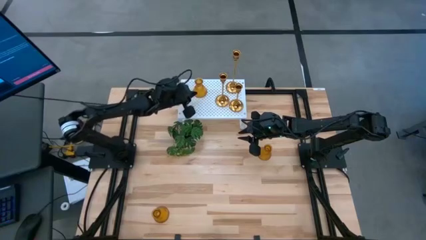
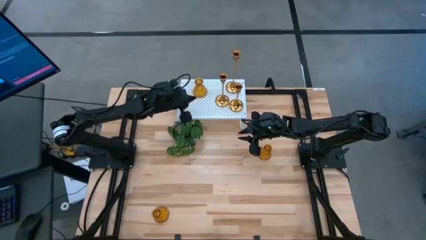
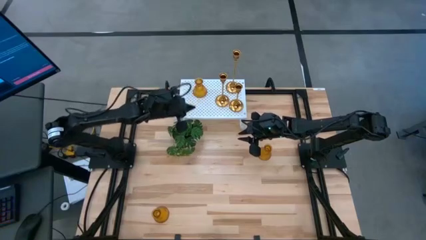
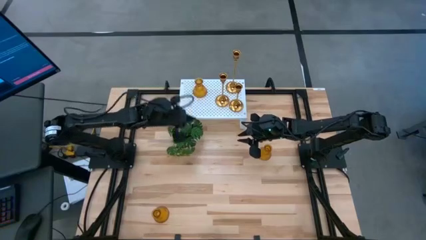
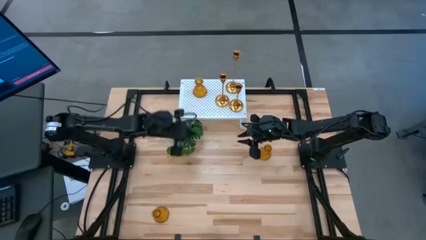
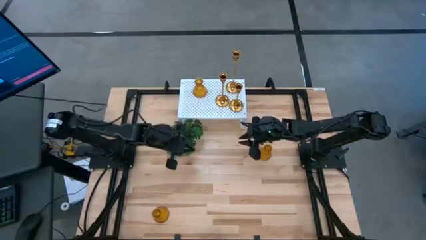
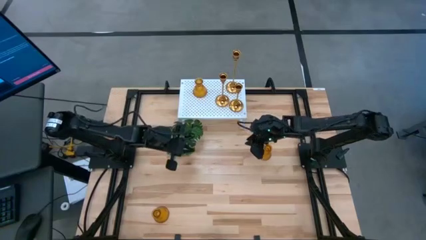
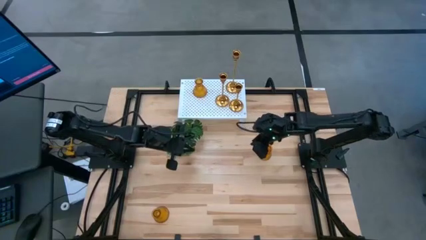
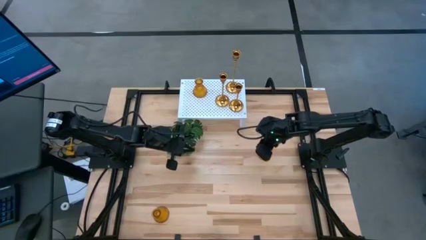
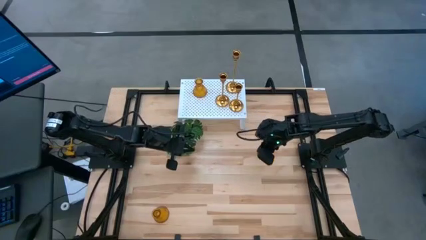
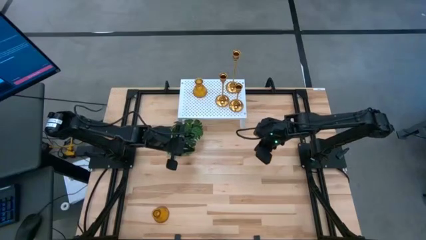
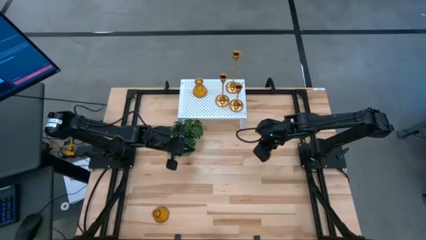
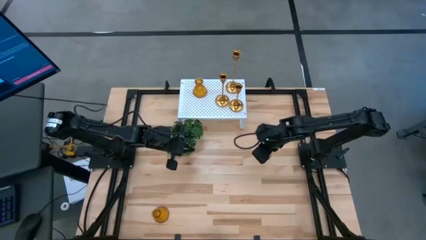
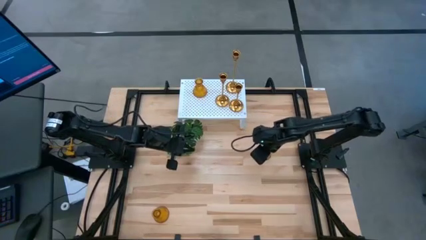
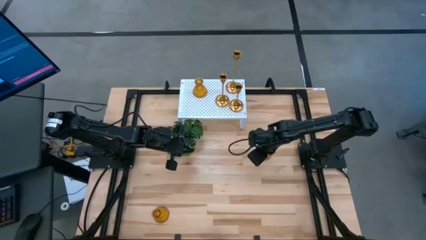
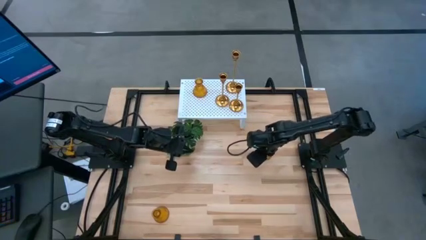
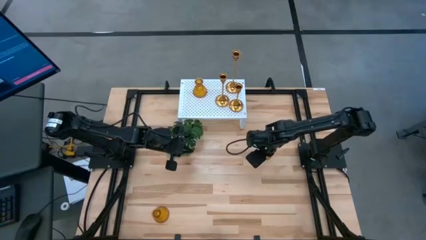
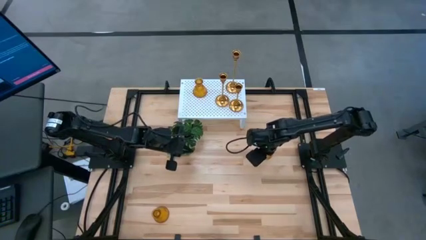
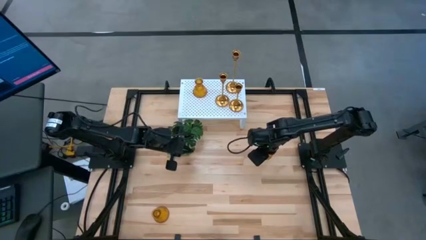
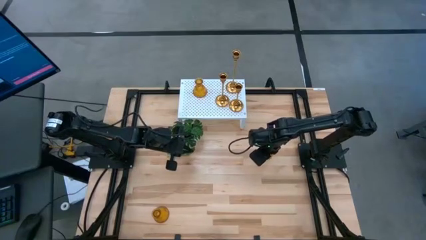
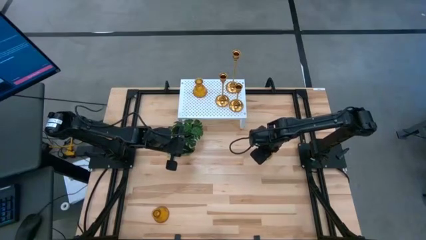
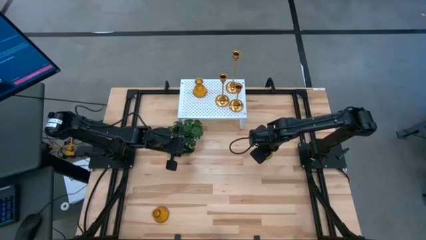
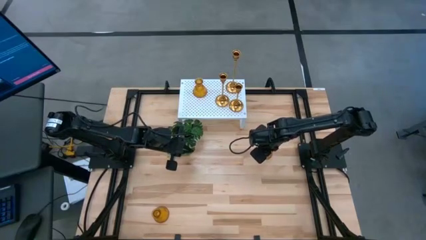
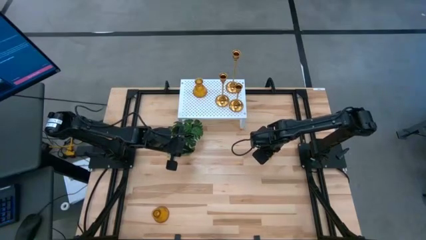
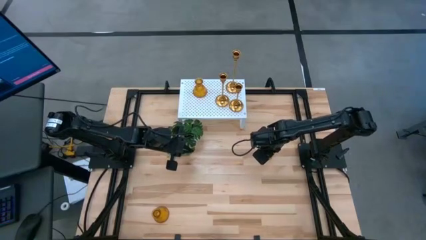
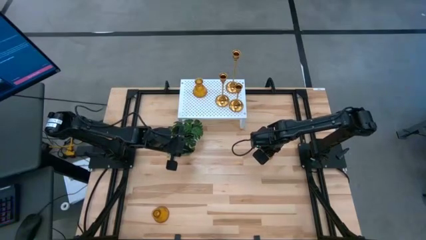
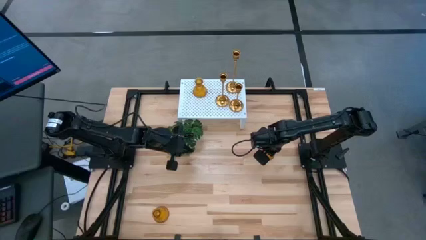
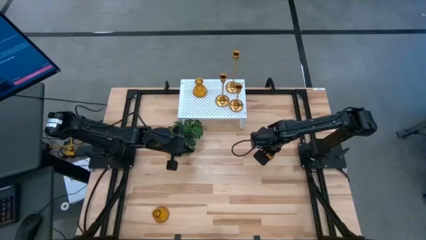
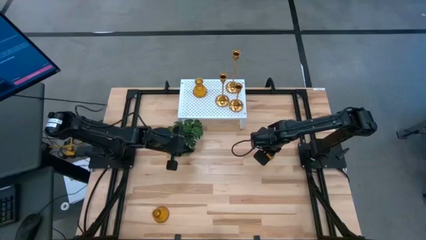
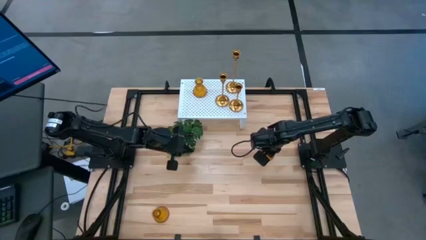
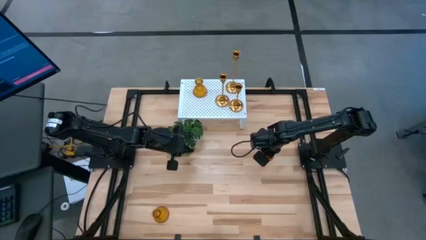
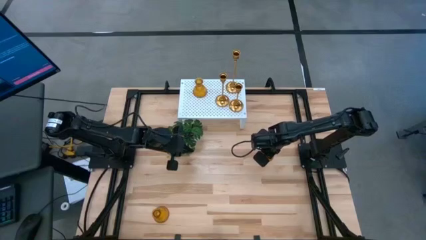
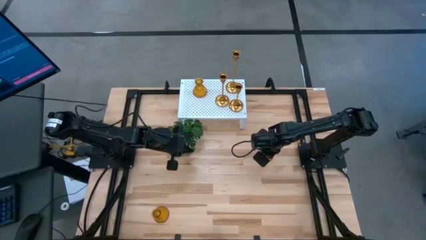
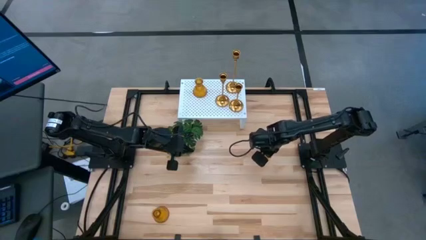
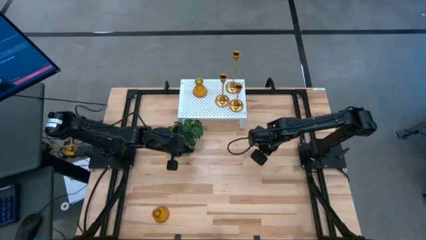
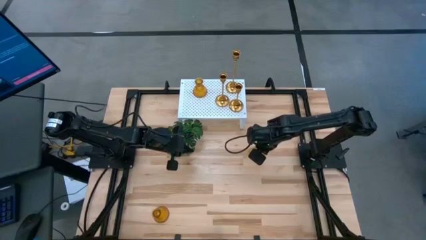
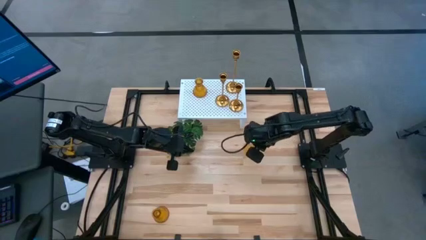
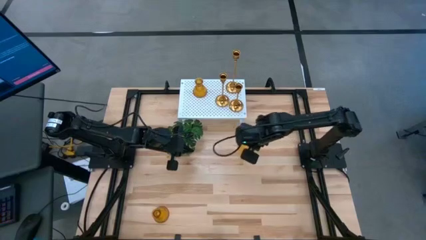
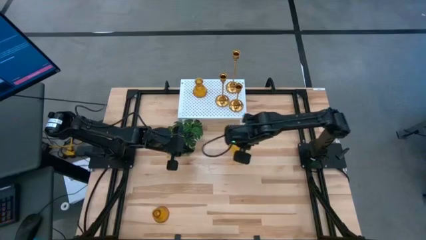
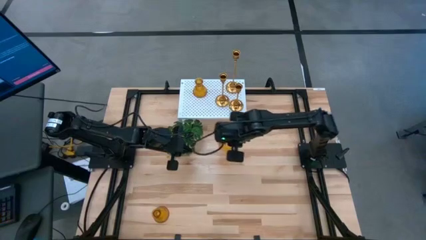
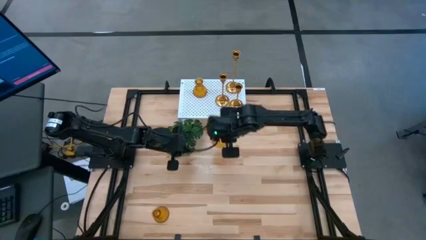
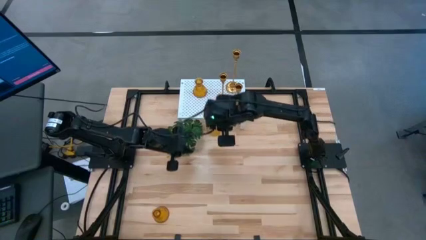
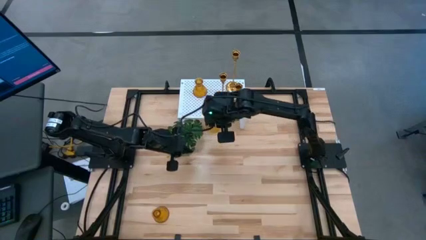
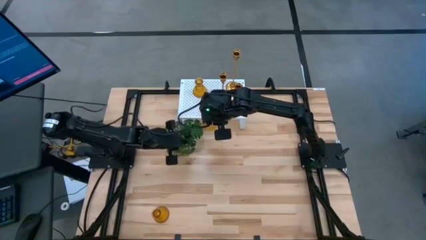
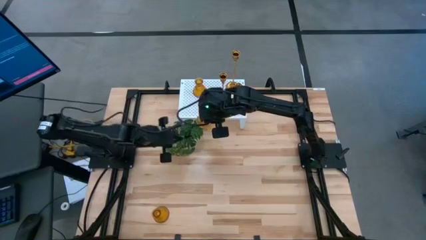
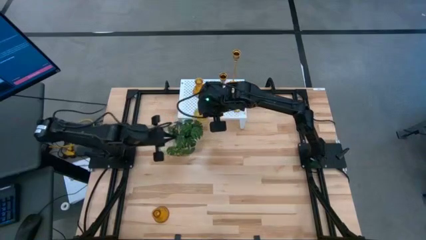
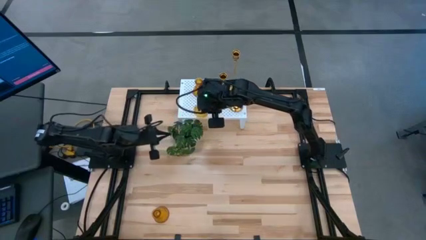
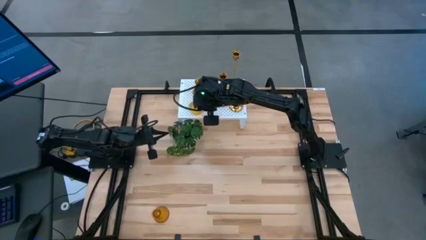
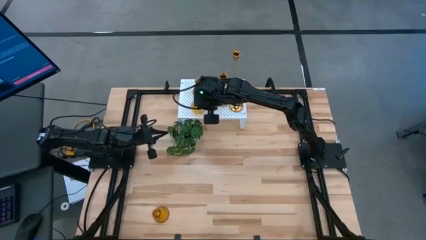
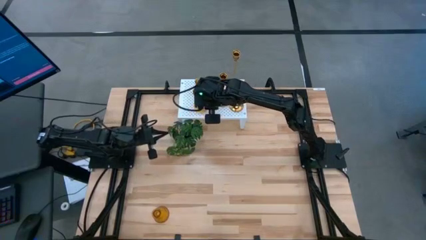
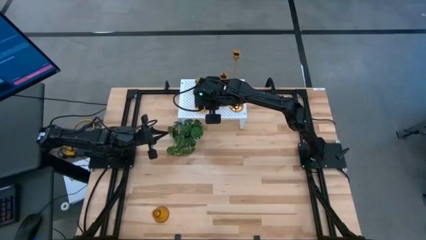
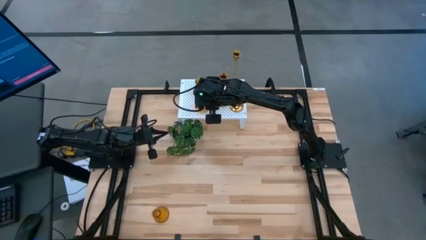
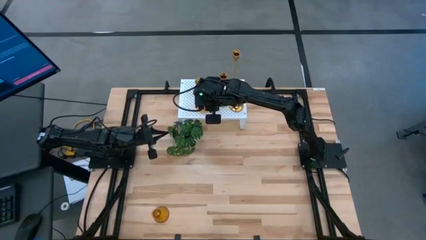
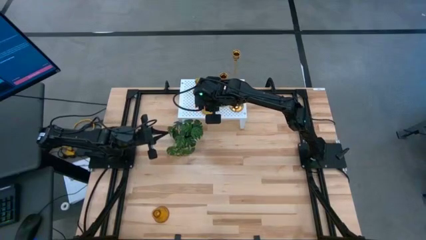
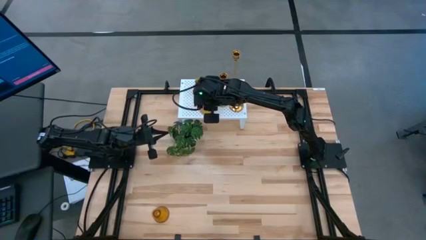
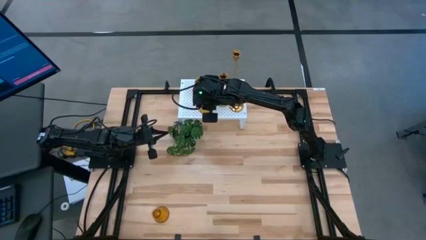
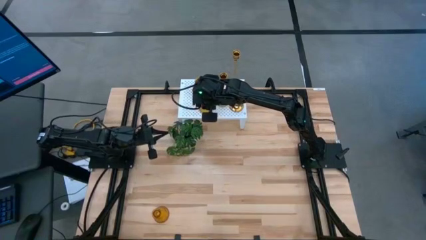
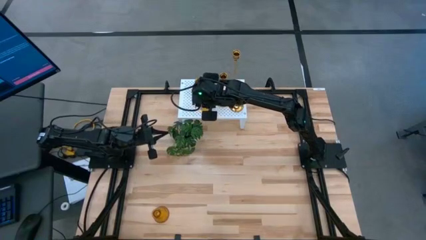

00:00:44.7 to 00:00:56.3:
Task: Pick & Place candle stick holders
Put the top yellow glass candle holder on the shelf

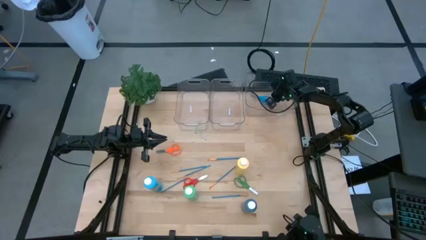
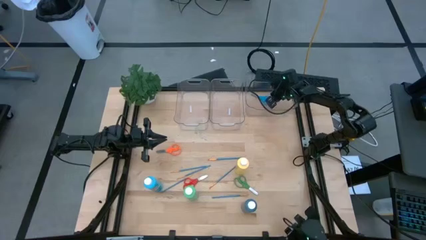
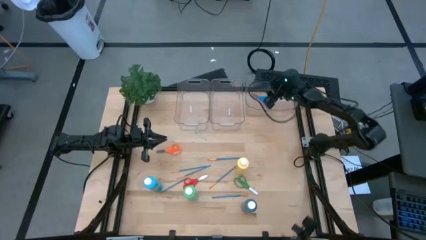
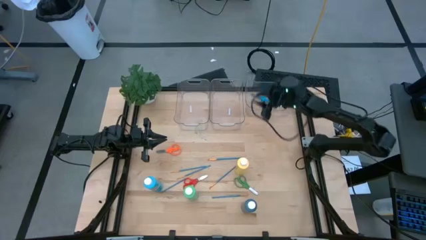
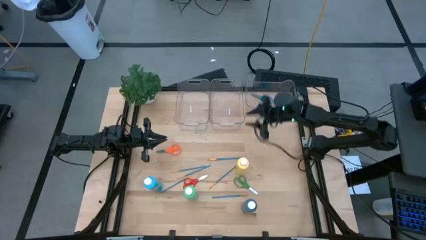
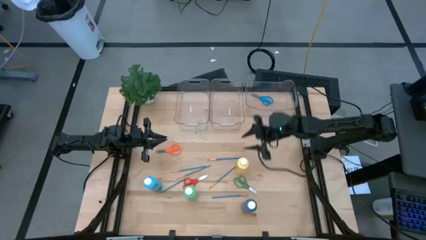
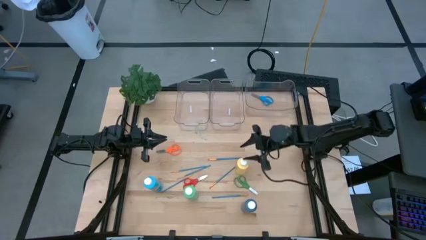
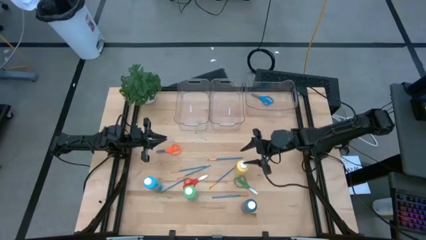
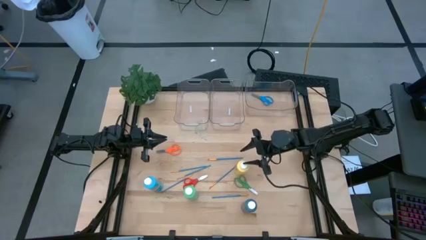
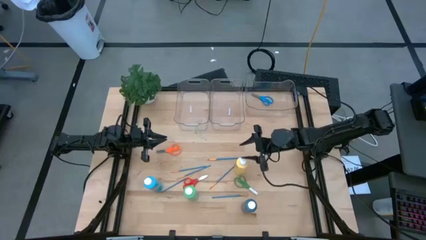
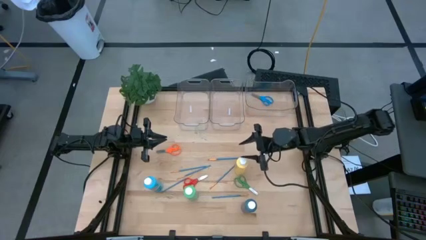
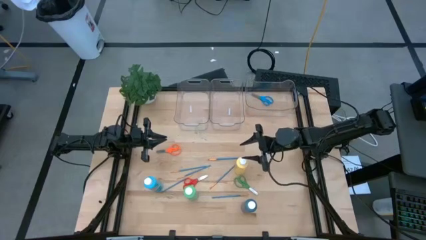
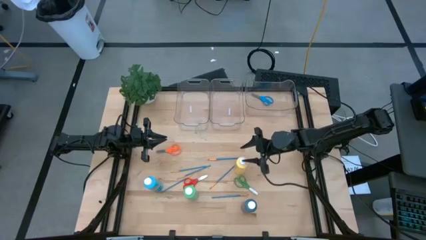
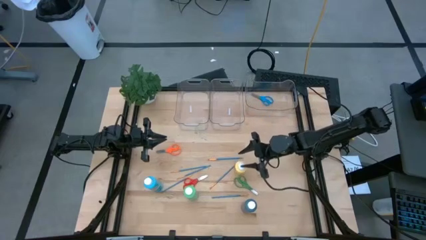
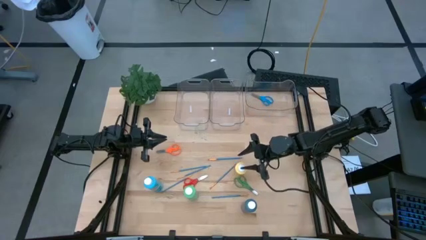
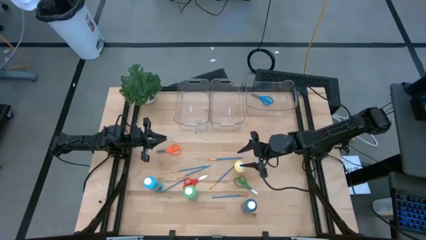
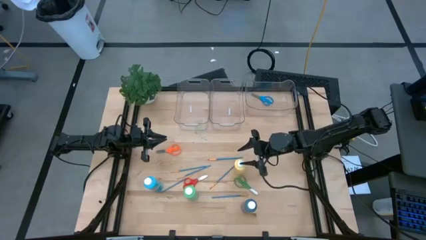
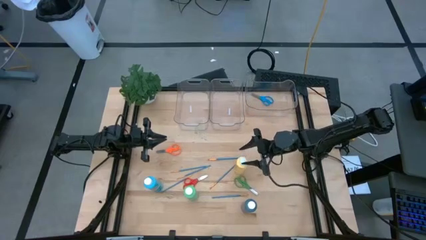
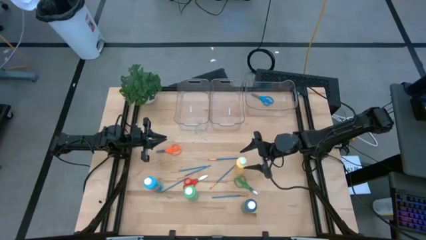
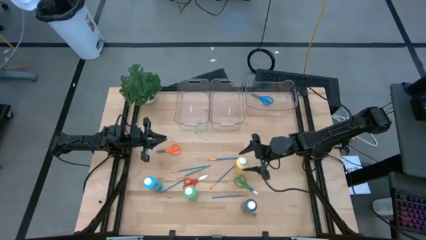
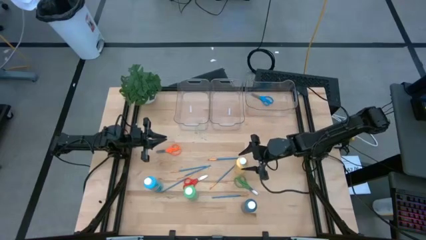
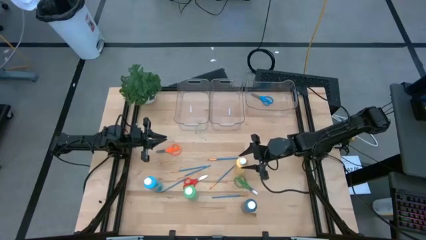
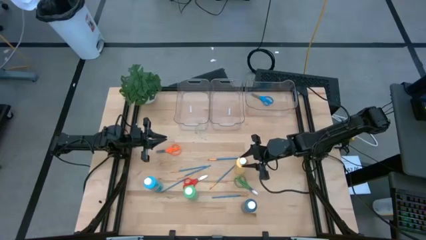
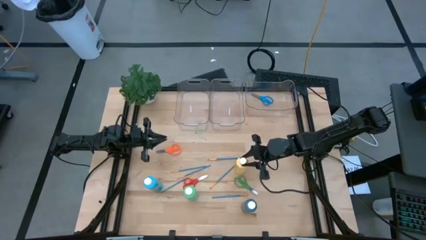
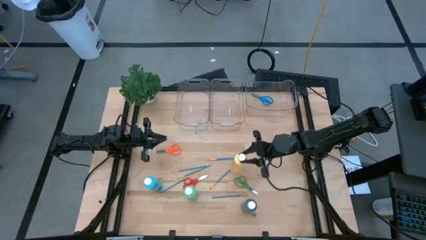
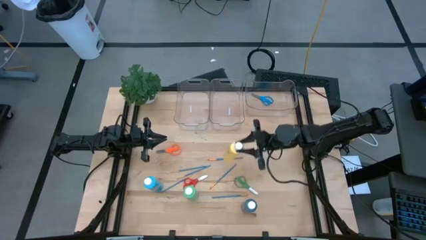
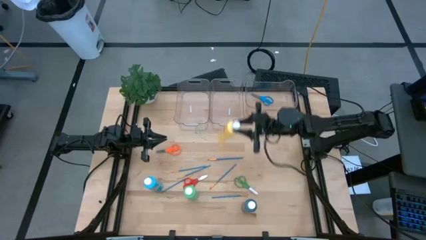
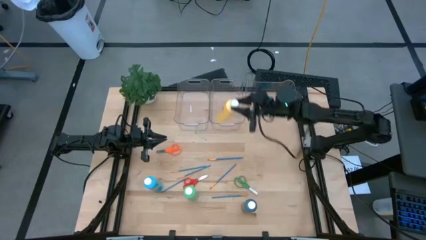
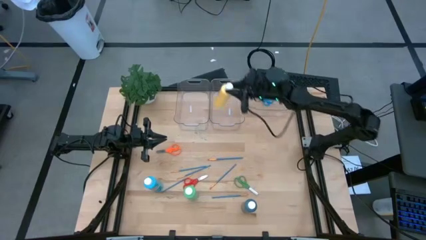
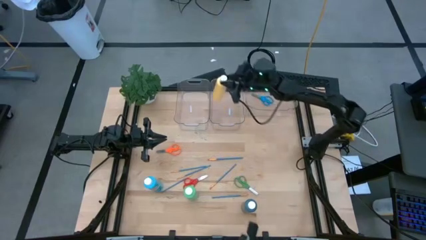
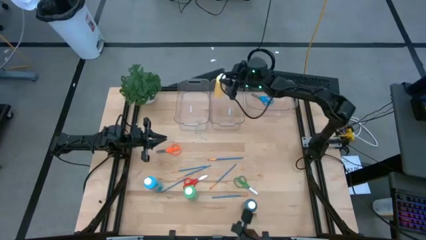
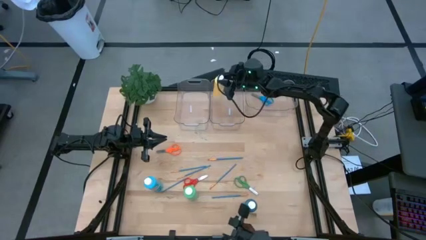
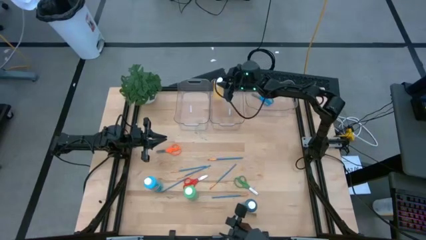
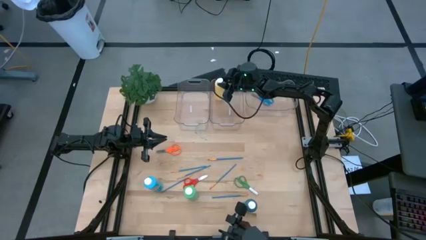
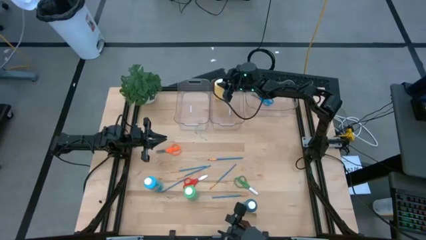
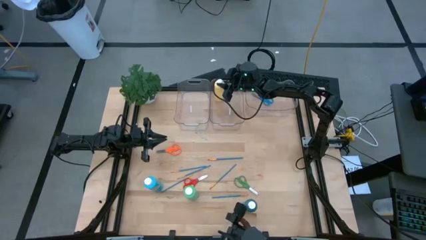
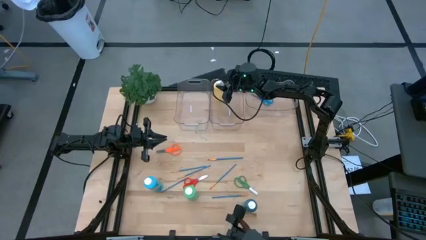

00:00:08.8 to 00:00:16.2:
Task: Pick & Place Paint Supplies
Put the yellow paint bottle into the middle transparent bin
